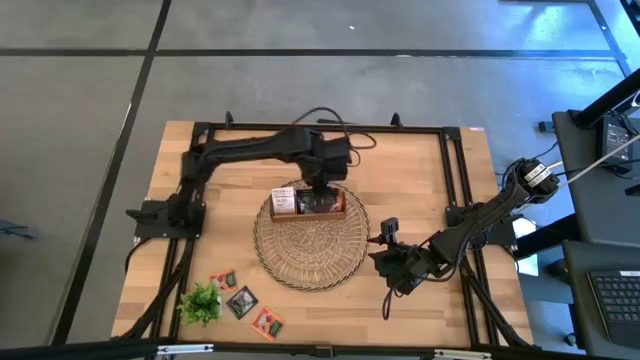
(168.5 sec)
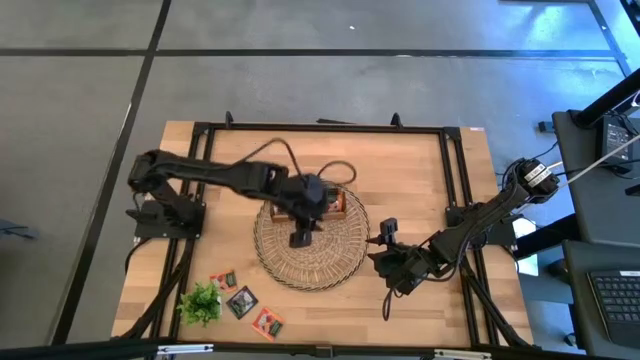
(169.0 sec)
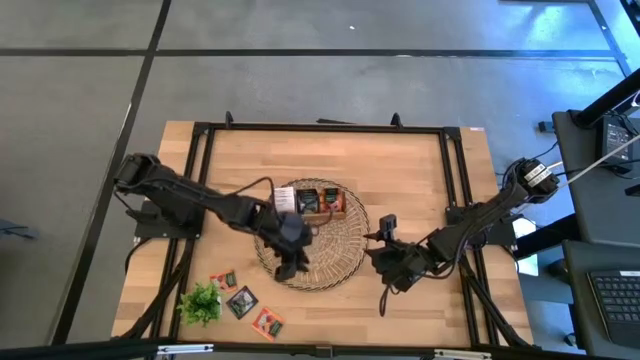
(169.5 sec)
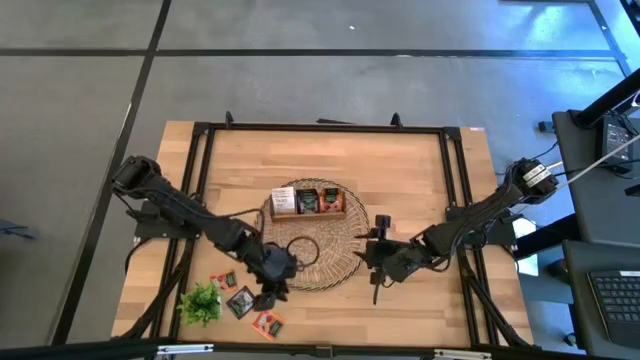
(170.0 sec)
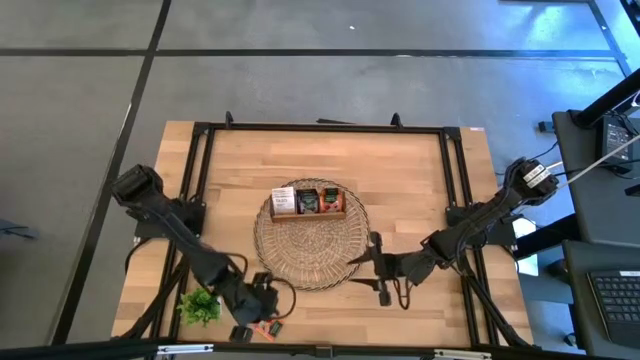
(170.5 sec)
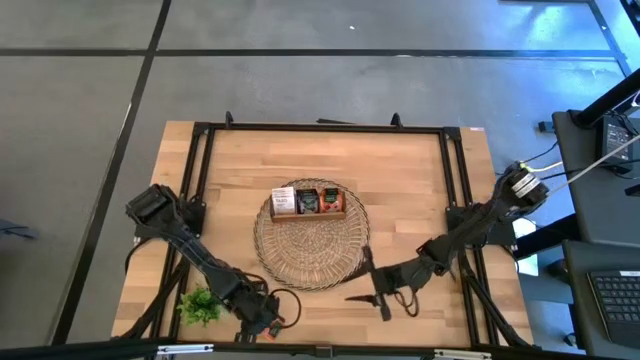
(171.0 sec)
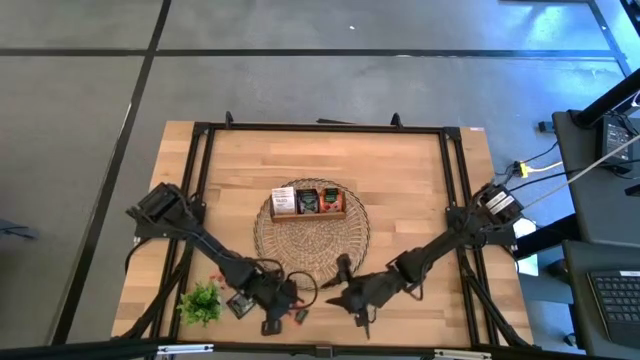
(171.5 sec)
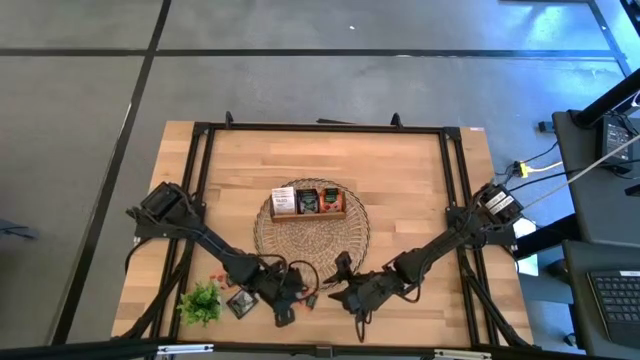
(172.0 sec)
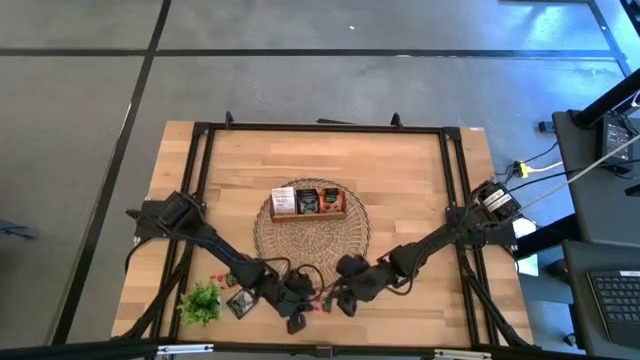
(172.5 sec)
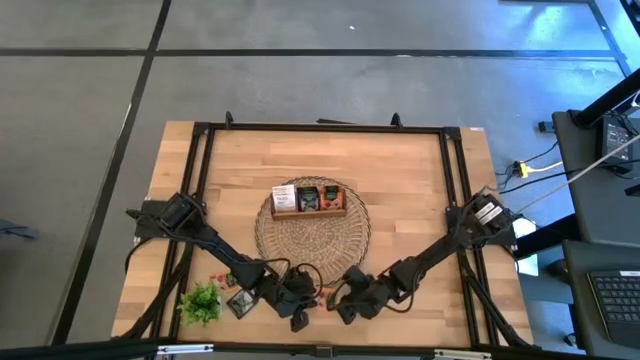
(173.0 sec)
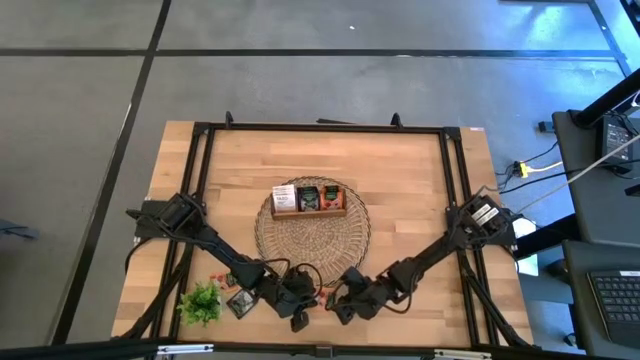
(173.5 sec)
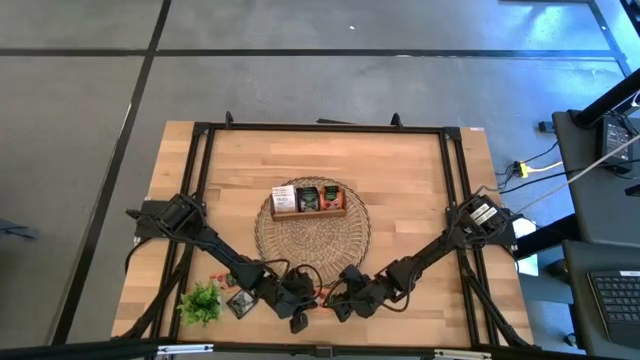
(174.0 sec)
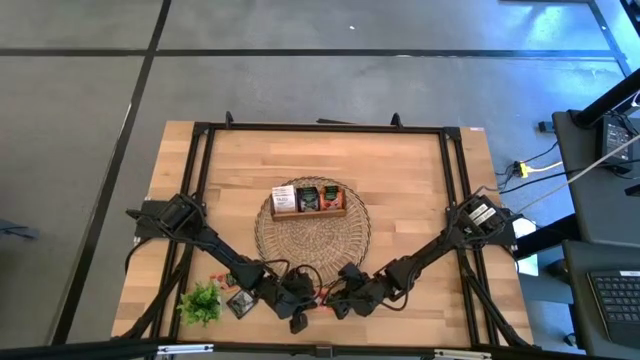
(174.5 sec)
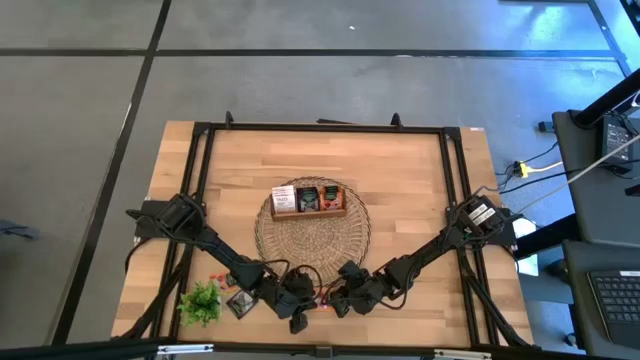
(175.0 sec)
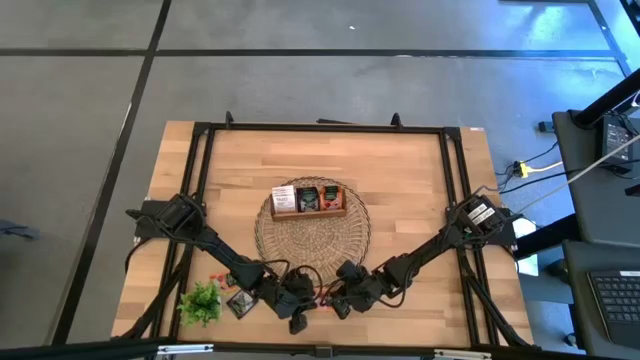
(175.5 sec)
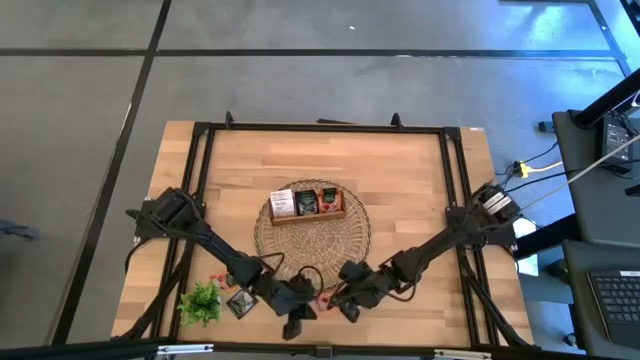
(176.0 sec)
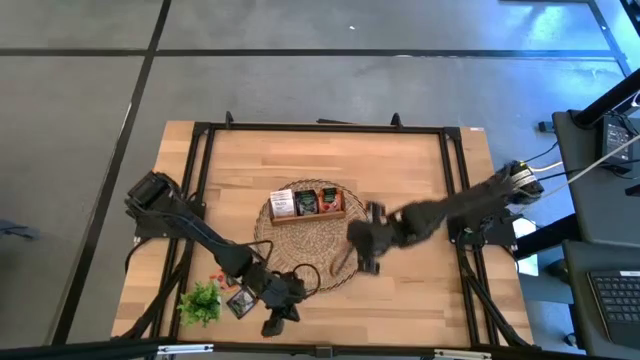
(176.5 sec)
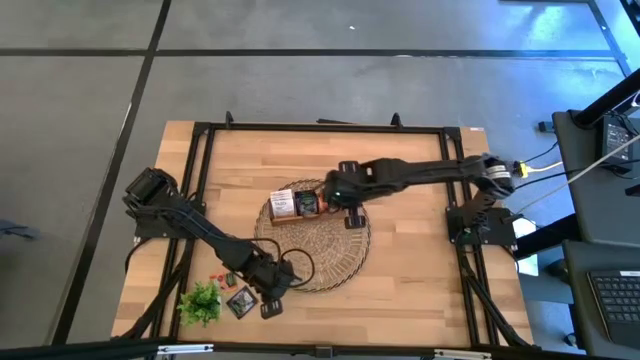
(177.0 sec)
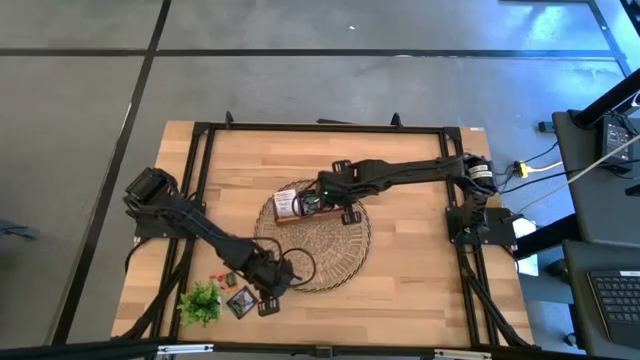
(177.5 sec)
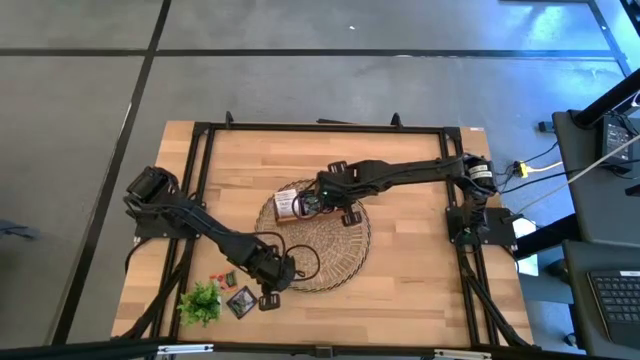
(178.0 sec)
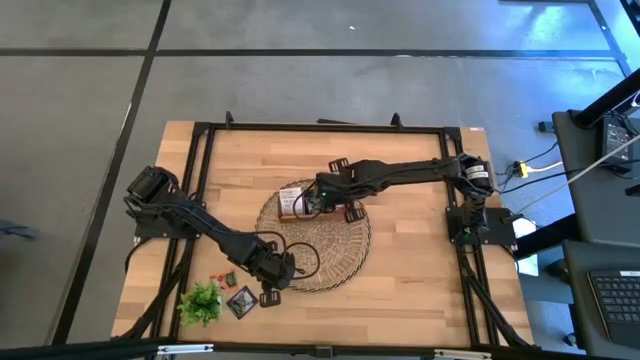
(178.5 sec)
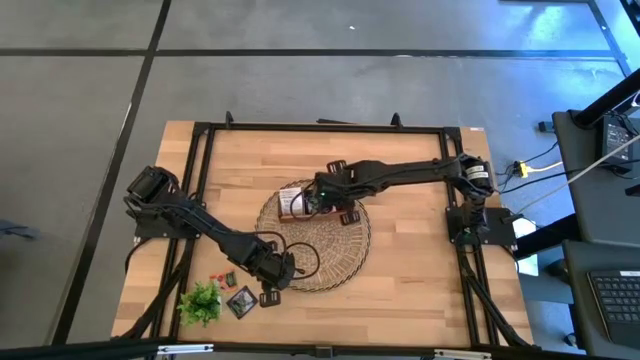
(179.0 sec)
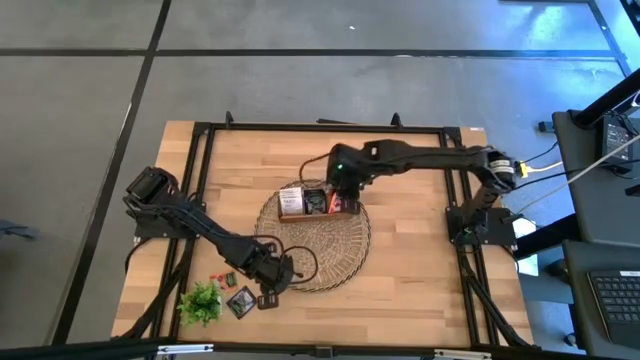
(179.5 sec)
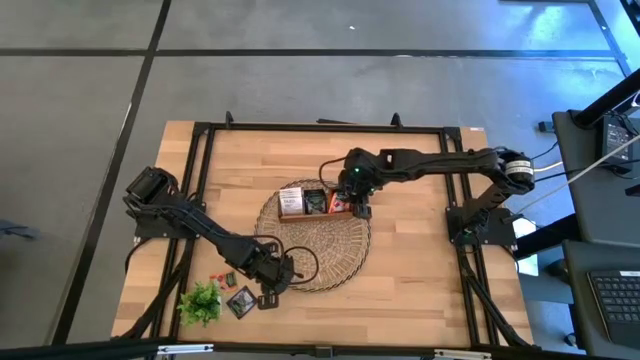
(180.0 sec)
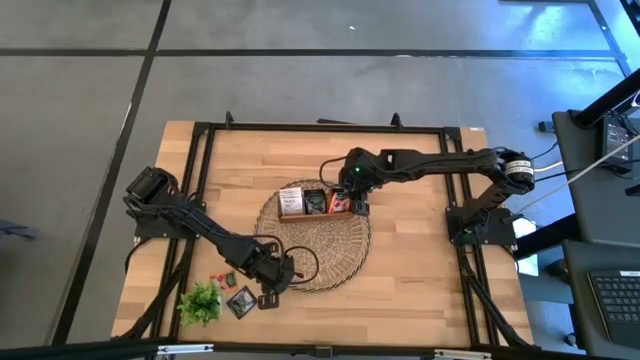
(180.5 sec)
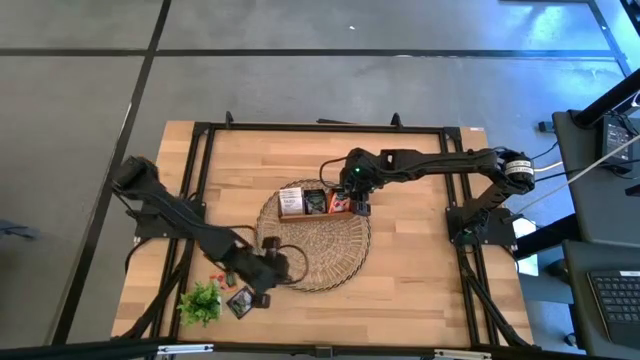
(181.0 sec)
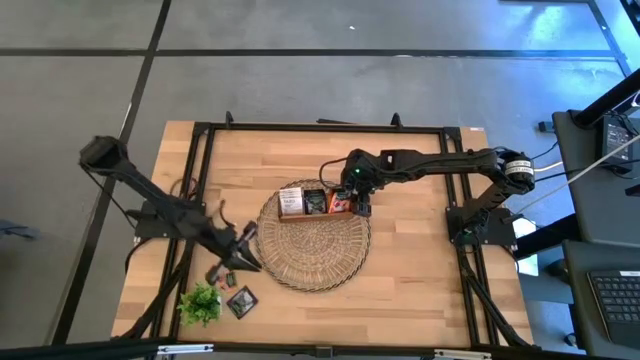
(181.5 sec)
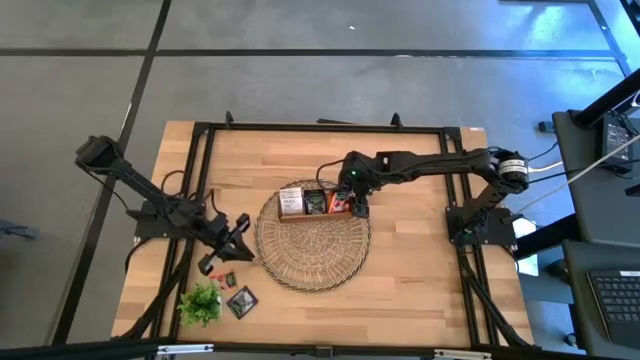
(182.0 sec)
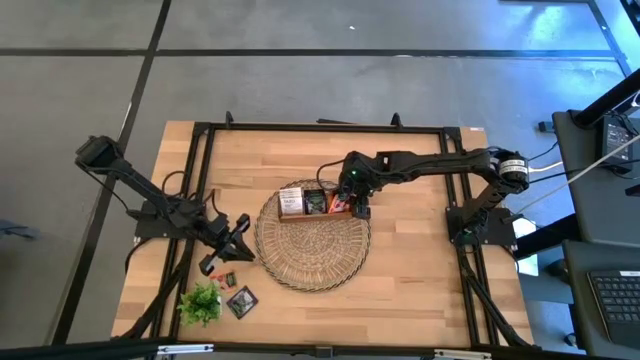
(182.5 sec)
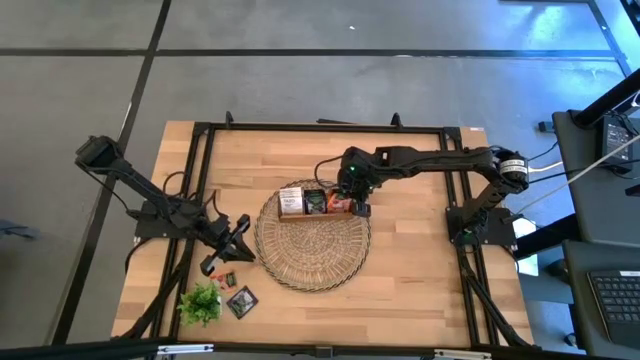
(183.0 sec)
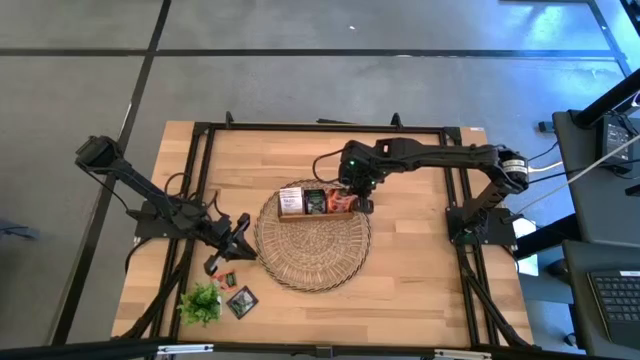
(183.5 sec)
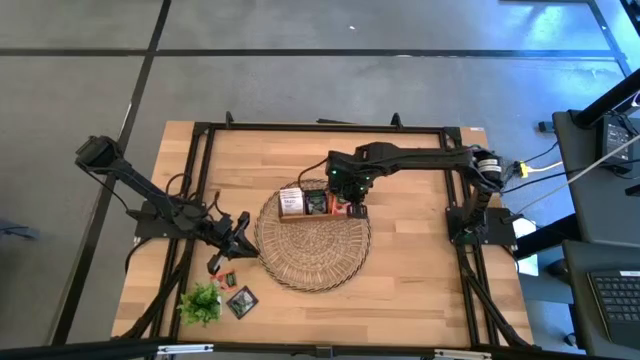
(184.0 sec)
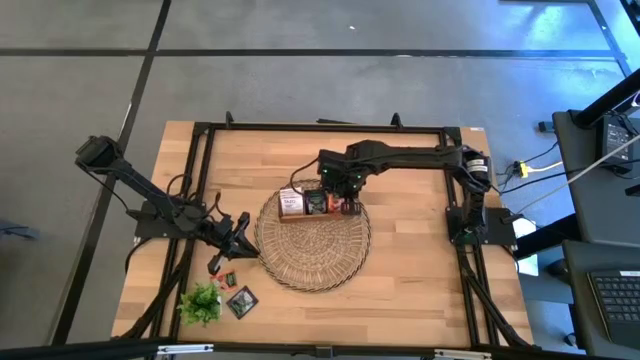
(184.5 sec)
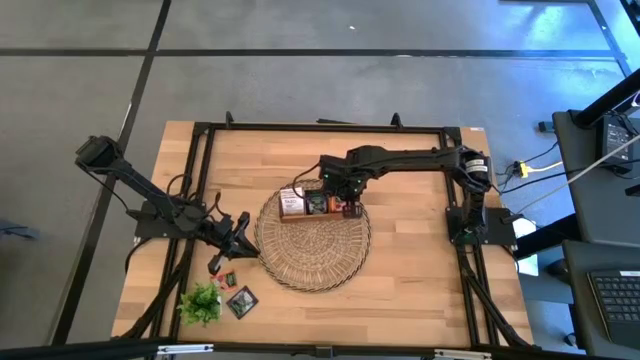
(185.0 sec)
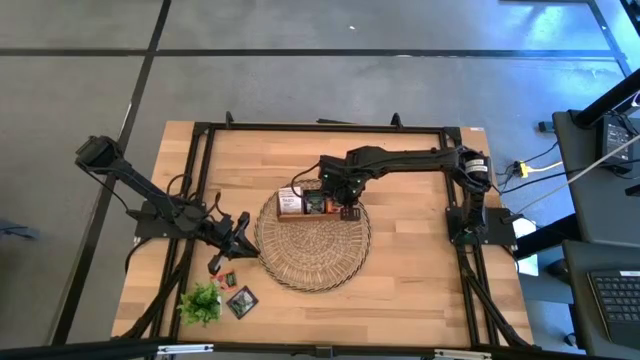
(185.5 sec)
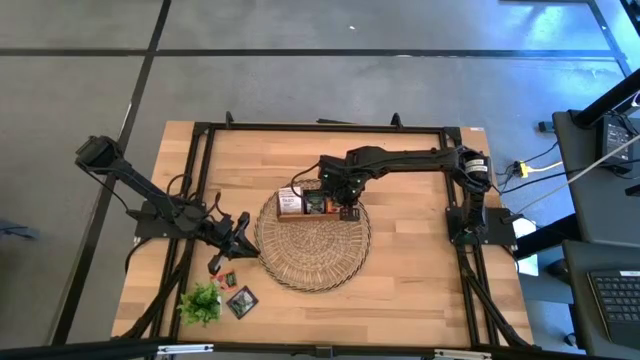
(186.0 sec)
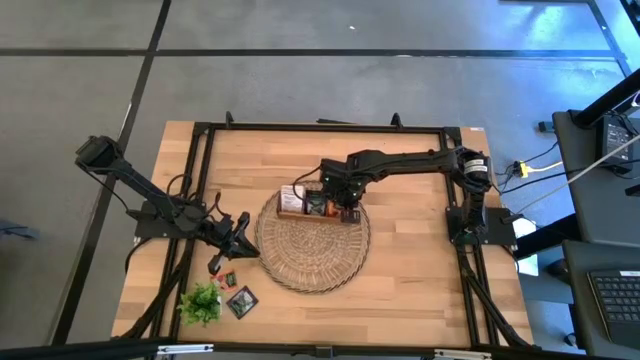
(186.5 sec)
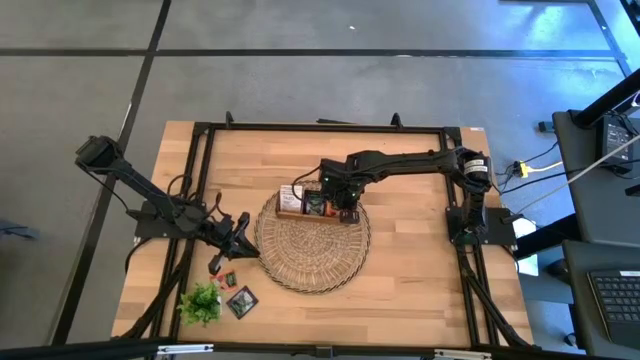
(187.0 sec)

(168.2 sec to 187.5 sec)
Task: Pick & Place Tea
Put the right orange tea bag into the right slot of the wooden organizer
